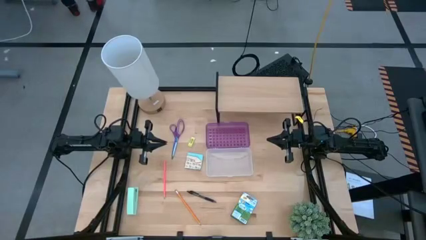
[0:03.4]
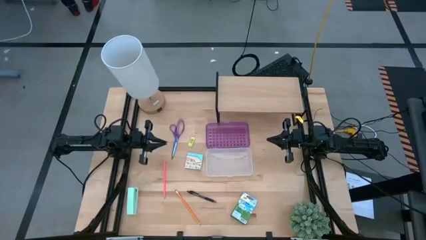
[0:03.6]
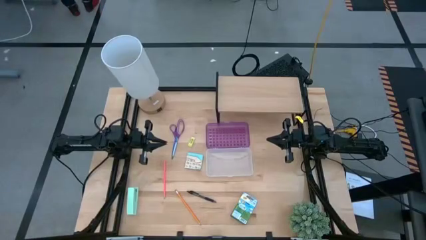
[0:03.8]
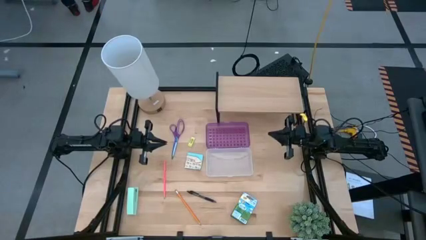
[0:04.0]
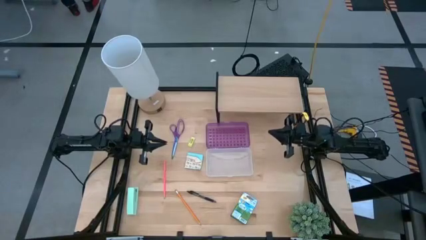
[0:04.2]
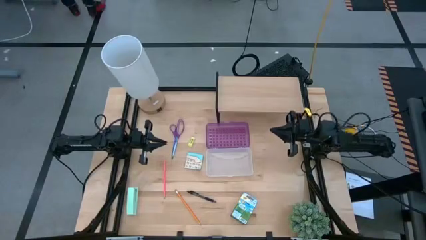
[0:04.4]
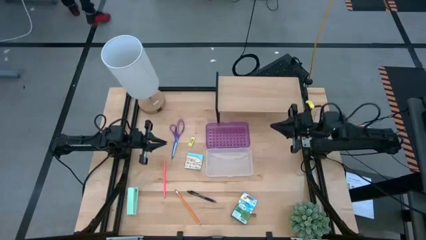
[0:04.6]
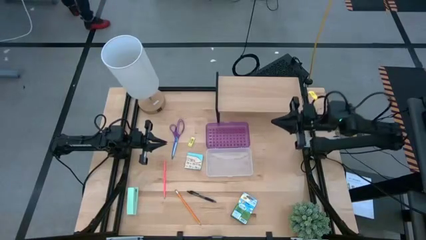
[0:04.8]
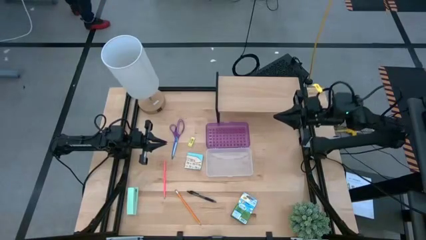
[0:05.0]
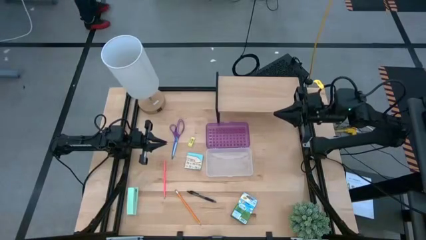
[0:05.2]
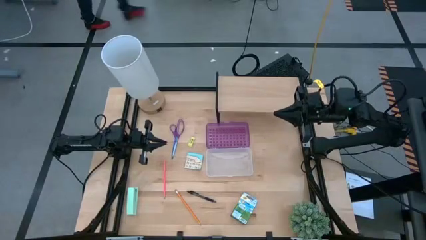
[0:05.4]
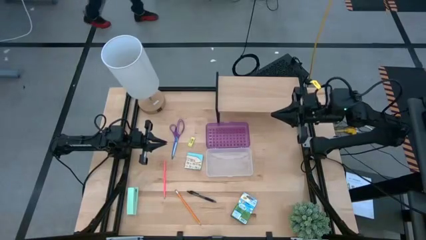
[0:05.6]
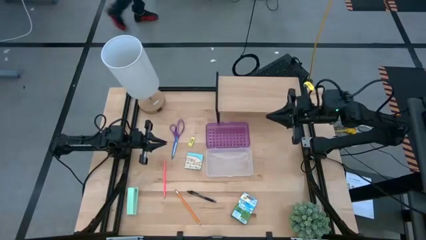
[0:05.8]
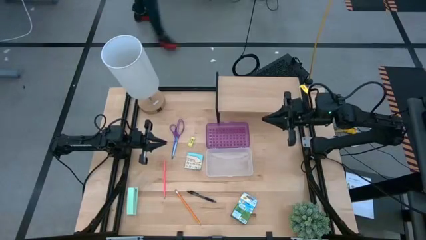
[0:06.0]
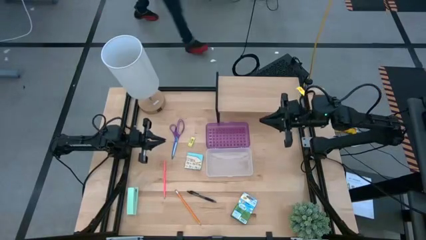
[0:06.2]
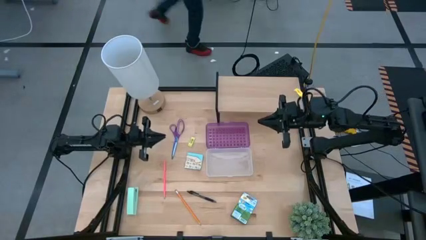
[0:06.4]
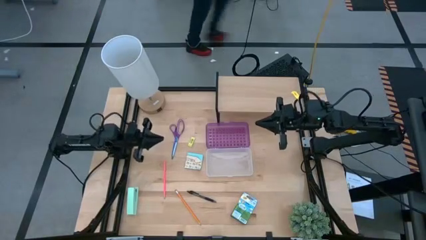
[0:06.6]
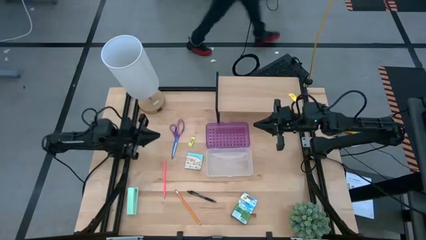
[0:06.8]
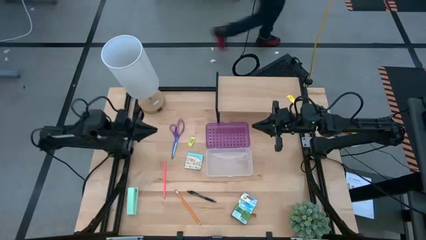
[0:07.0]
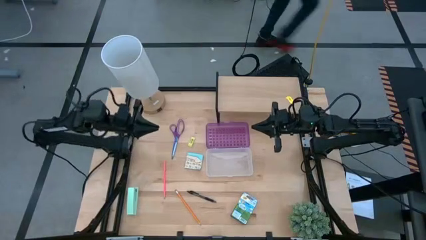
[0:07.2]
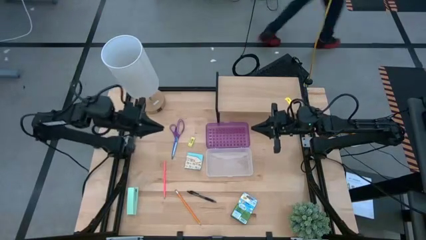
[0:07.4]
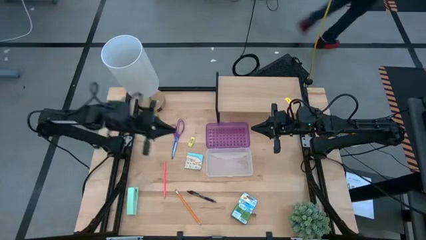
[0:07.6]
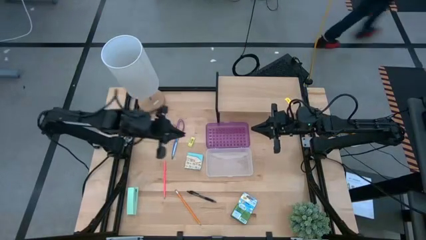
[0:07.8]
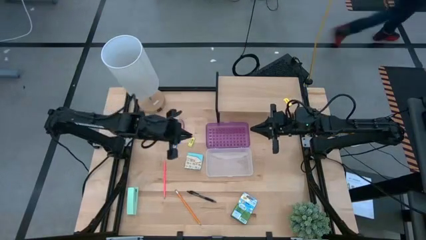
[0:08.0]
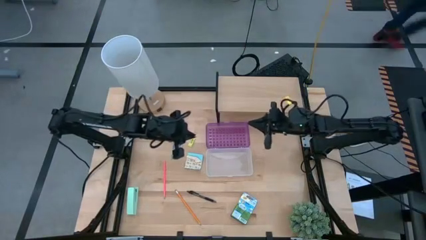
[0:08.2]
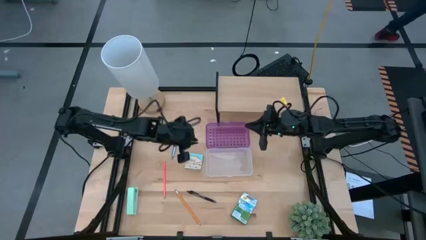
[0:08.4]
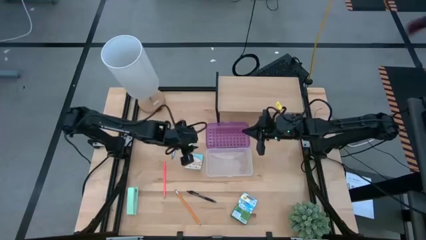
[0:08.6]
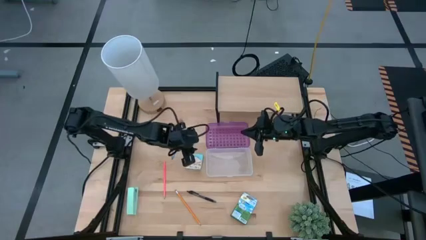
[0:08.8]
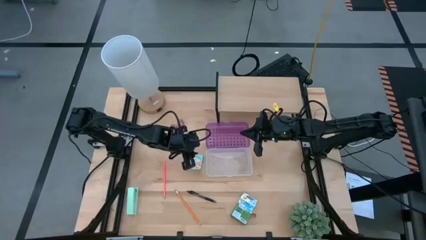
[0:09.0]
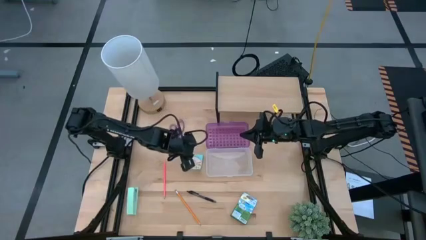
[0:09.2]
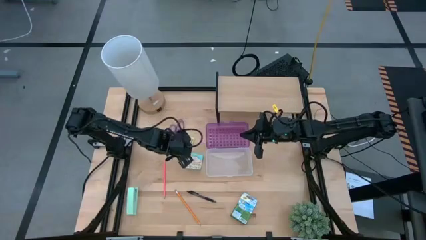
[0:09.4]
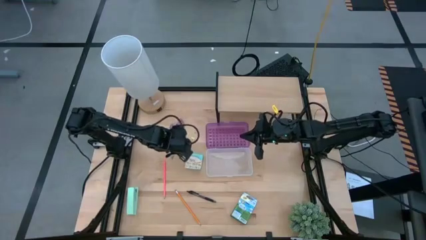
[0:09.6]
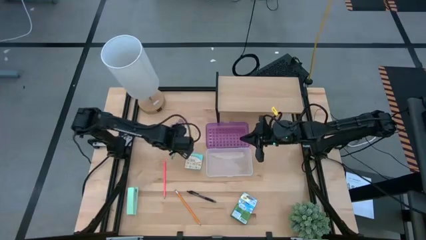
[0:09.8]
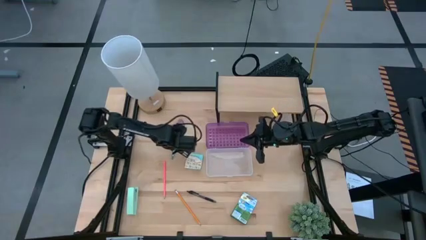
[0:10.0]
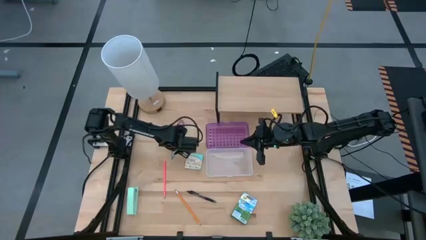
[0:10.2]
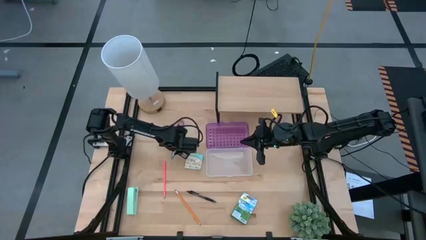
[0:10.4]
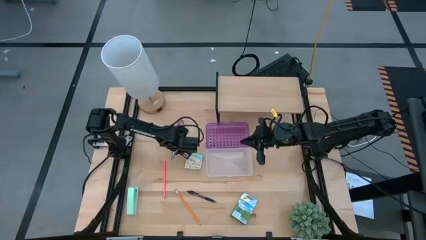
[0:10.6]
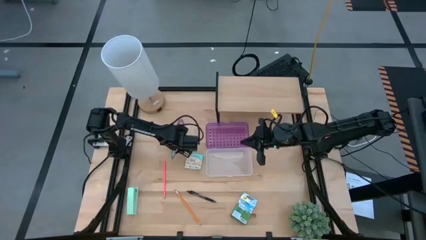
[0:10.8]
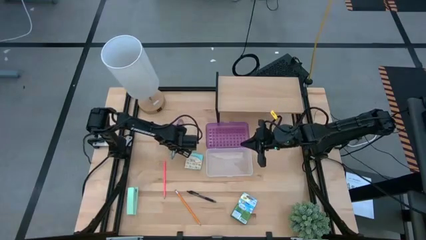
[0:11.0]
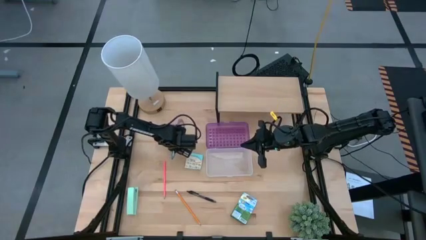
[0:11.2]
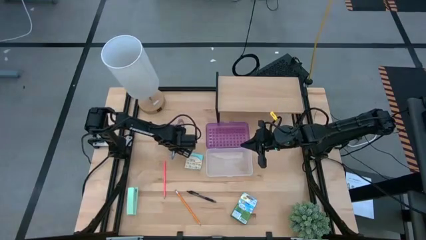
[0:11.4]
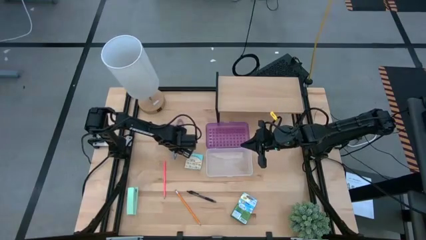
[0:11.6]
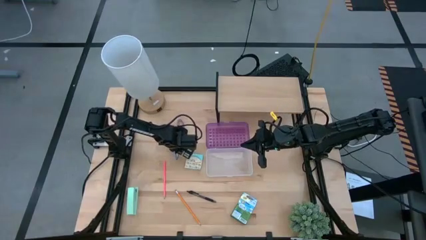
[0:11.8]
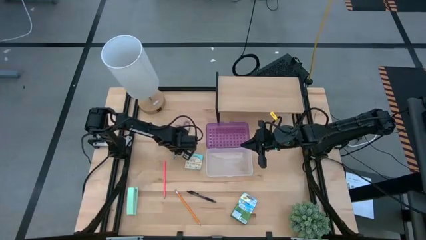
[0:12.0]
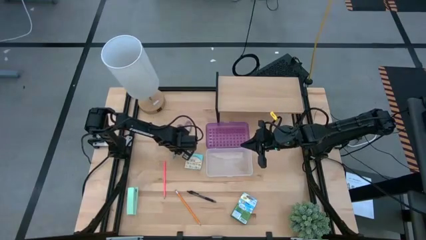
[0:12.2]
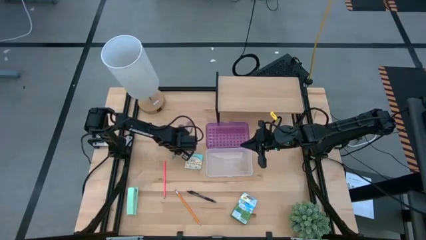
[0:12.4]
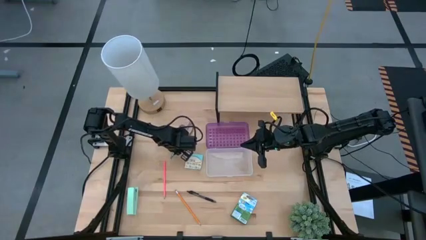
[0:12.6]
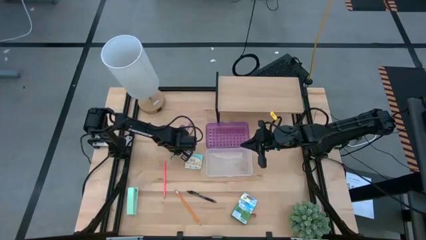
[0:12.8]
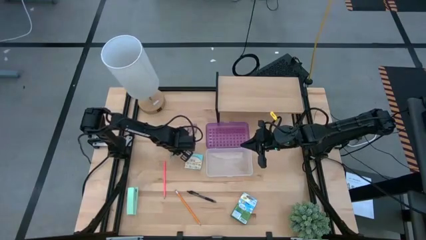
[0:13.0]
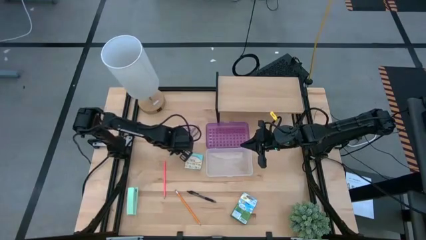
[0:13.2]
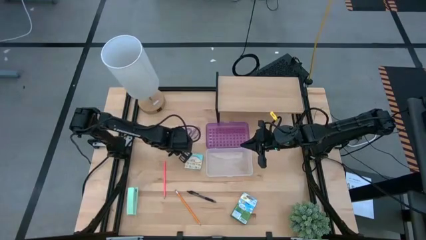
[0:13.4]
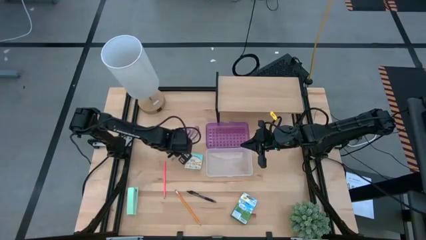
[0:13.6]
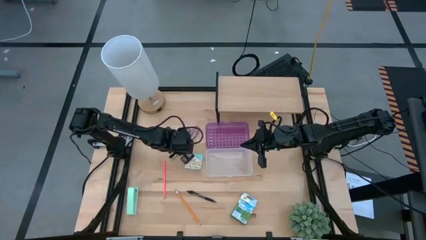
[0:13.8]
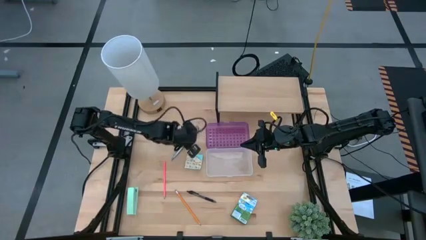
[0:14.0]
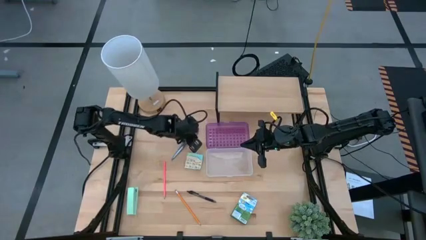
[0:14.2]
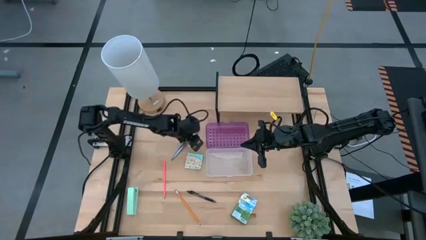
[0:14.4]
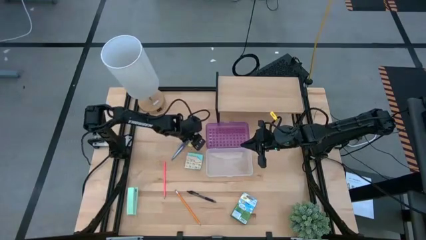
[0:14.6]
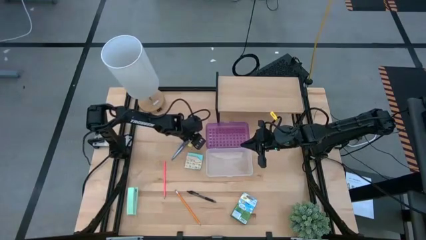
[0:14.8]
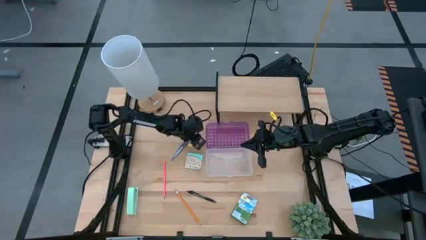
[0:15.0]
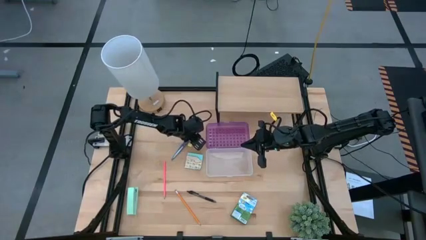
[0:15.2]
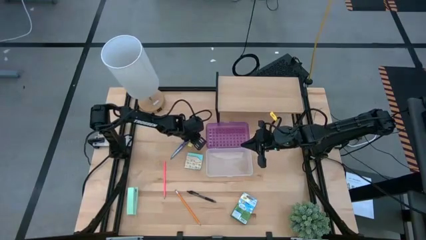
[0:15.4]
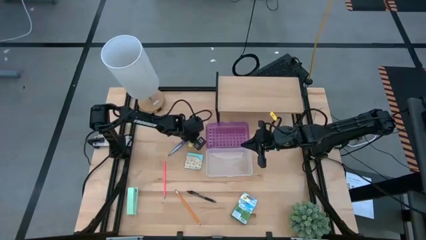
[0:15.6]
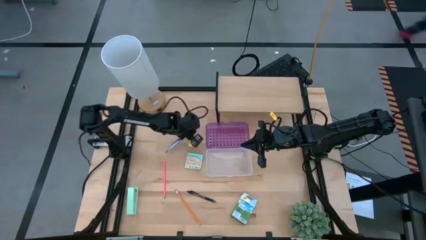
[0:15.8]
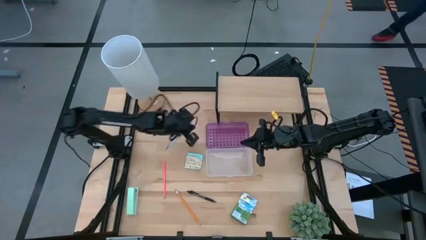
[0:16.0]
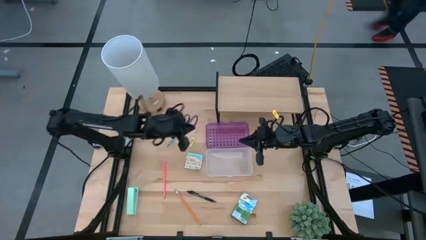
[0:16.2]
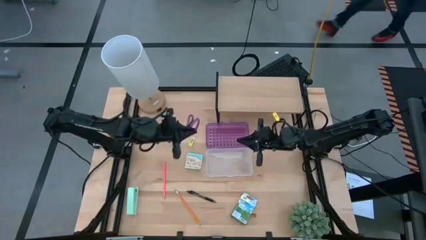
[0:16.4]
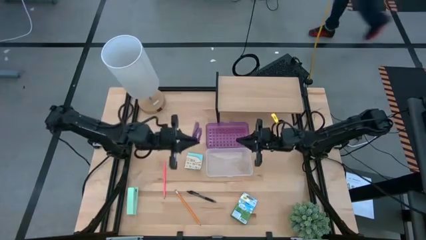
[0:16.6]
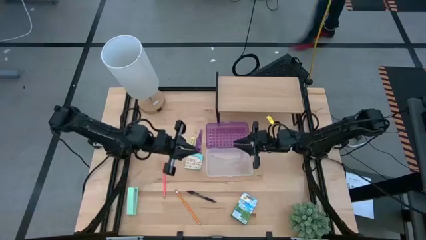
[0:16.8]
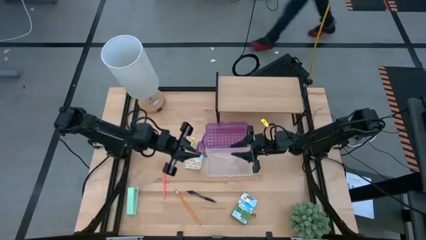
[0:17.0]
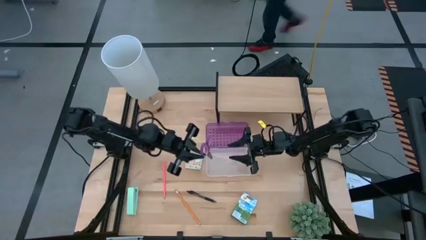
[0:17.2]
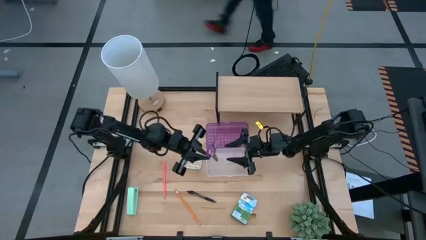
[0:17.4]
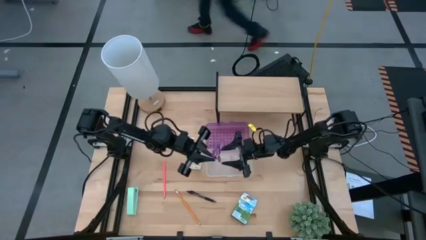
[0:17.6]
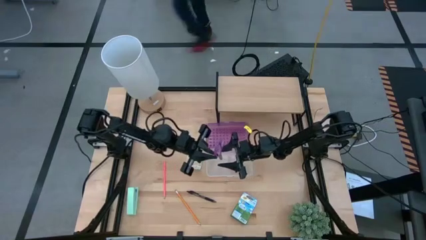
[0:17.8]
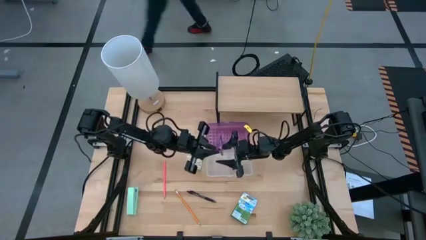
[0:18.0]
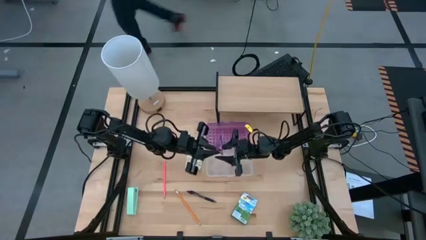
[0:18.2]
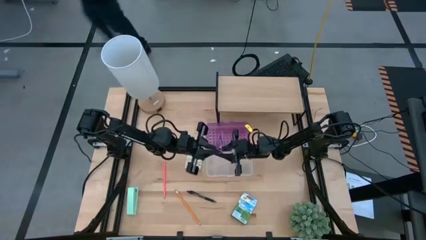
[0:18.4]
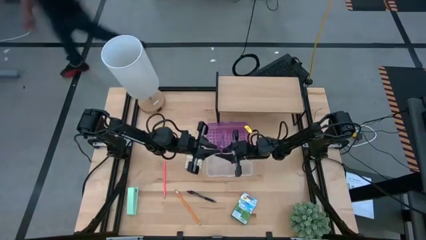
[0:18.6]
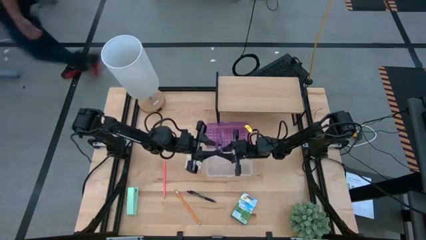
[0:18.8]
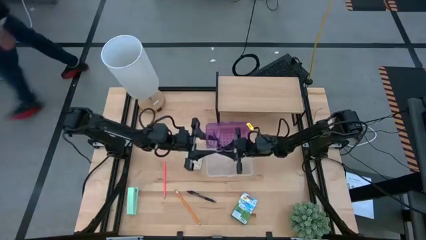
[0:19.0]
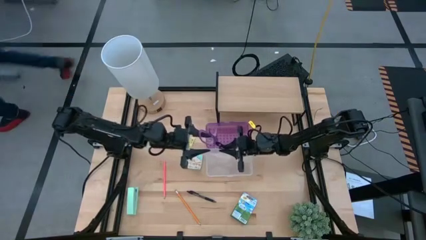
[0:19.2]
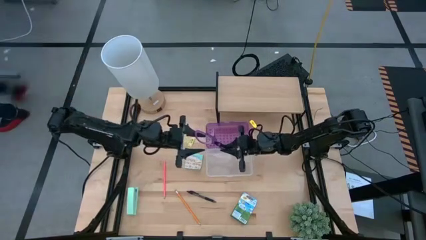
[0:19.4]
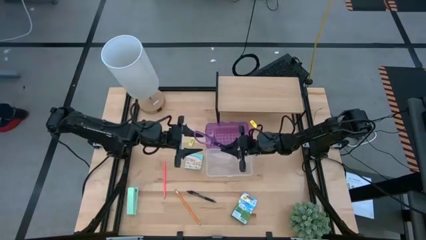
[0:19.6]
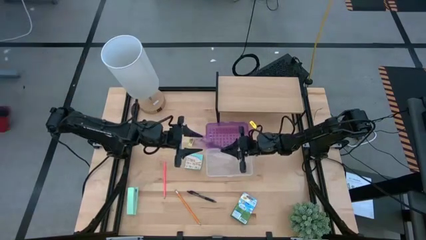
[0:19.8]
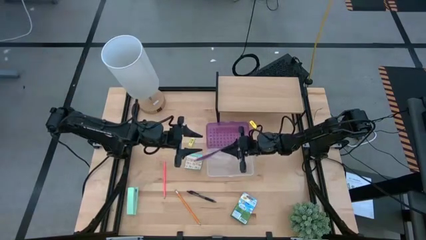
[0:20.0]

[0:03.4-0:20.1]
Task: Pack school essentials
Put the purple scissors into the purple supply box
